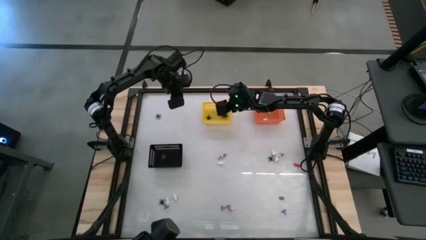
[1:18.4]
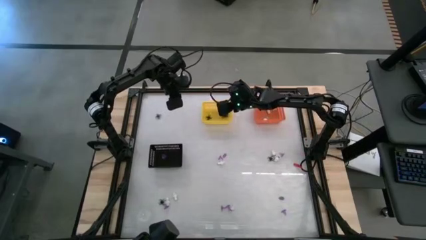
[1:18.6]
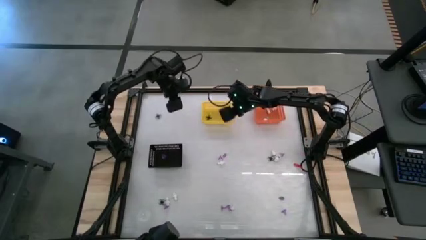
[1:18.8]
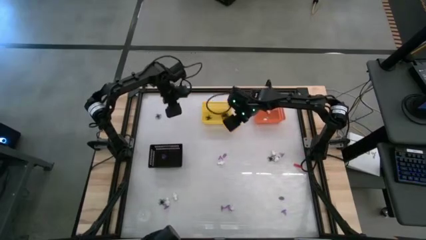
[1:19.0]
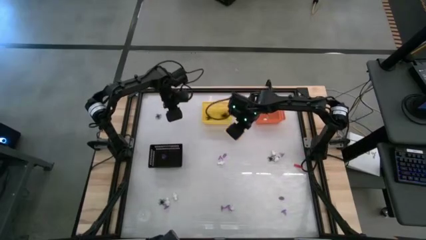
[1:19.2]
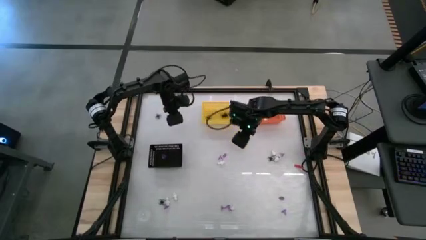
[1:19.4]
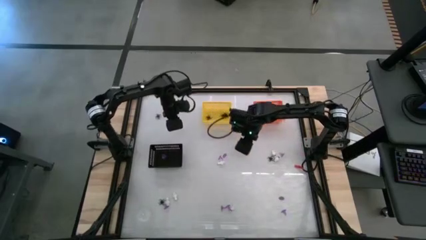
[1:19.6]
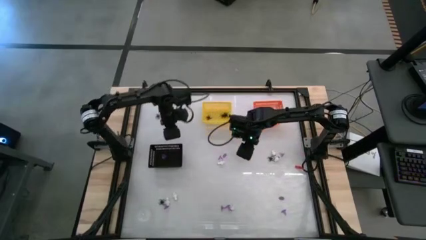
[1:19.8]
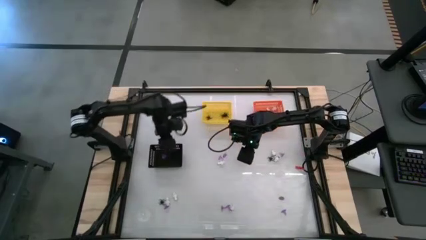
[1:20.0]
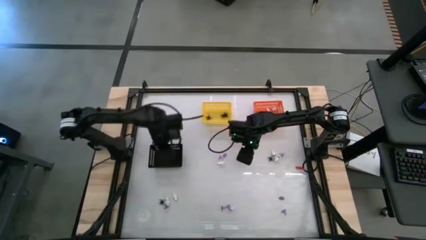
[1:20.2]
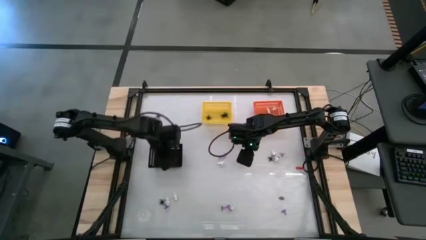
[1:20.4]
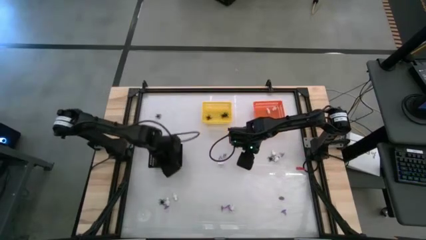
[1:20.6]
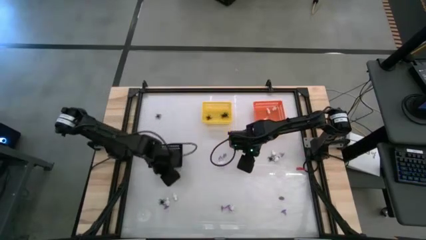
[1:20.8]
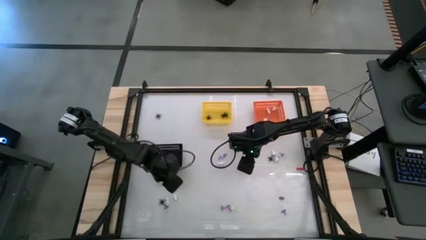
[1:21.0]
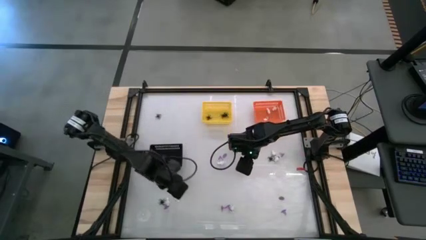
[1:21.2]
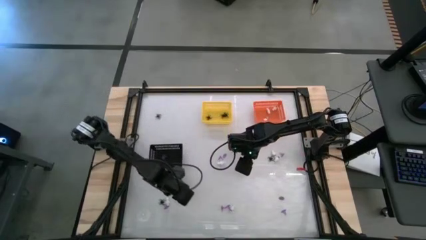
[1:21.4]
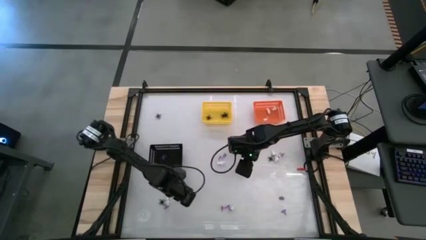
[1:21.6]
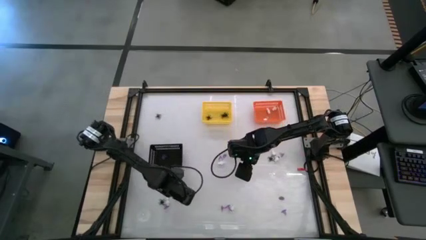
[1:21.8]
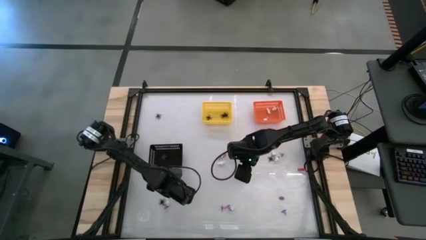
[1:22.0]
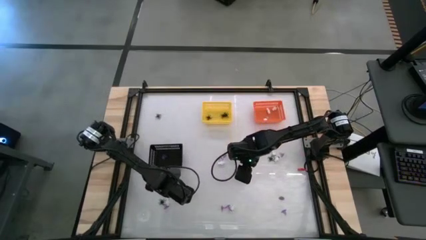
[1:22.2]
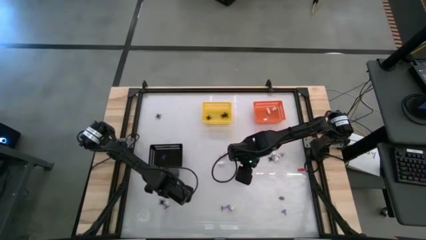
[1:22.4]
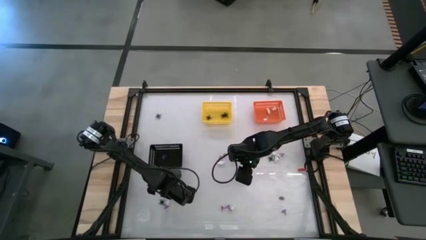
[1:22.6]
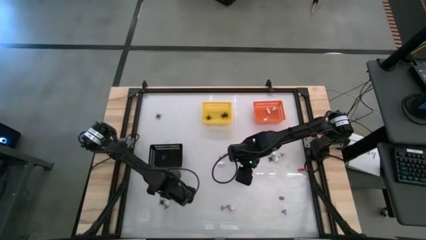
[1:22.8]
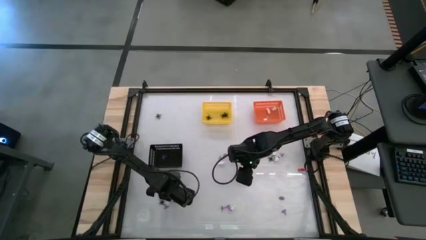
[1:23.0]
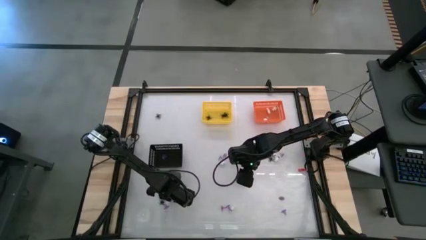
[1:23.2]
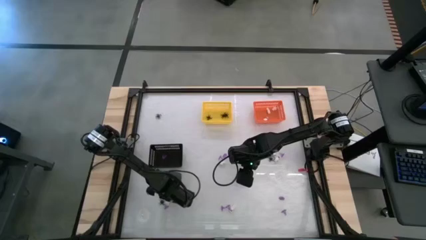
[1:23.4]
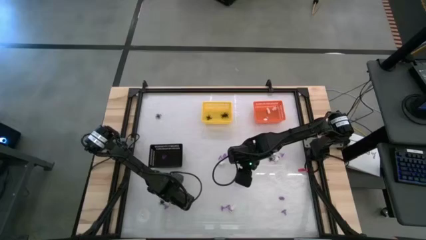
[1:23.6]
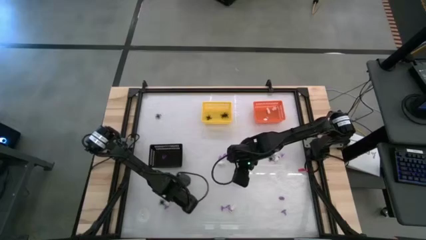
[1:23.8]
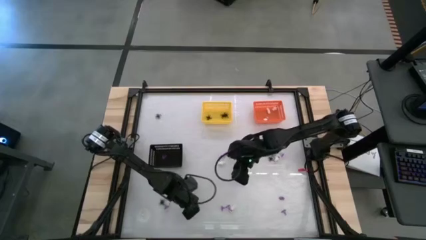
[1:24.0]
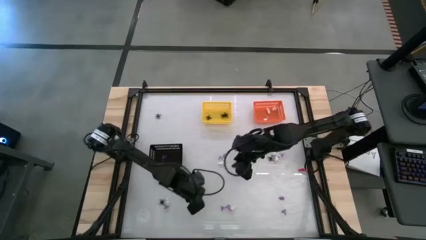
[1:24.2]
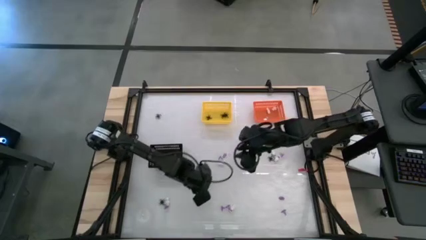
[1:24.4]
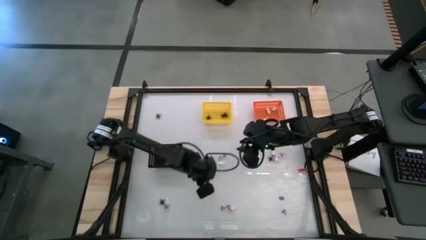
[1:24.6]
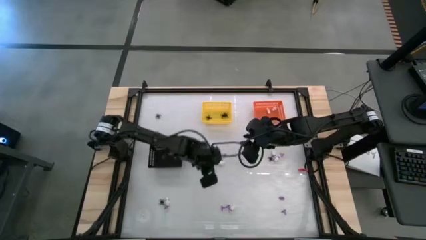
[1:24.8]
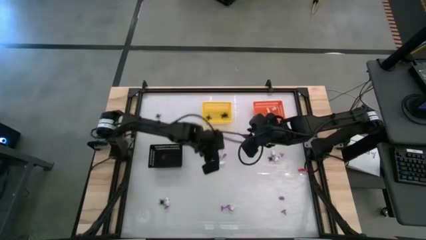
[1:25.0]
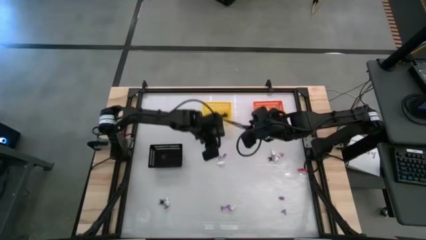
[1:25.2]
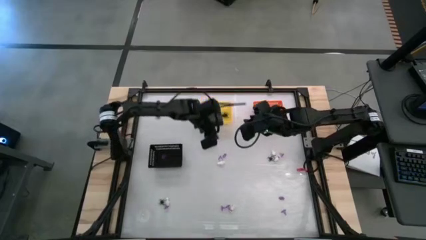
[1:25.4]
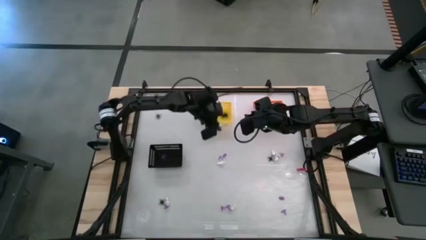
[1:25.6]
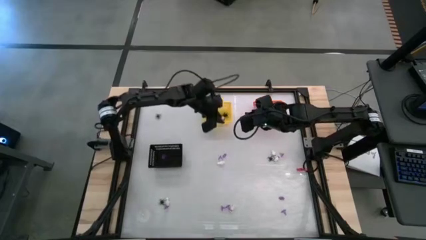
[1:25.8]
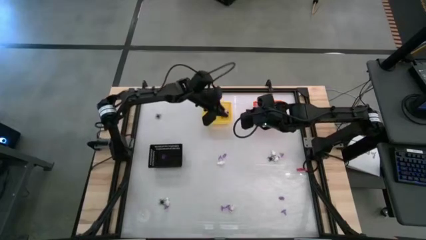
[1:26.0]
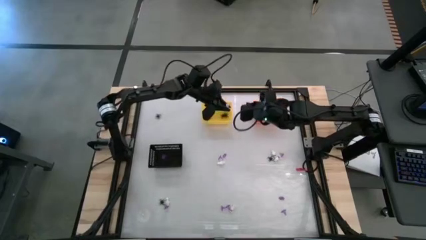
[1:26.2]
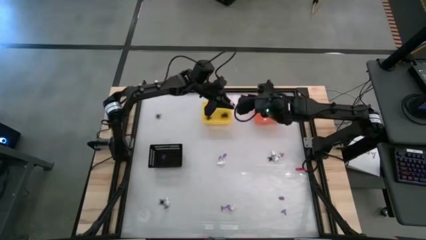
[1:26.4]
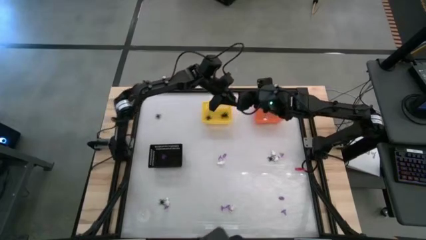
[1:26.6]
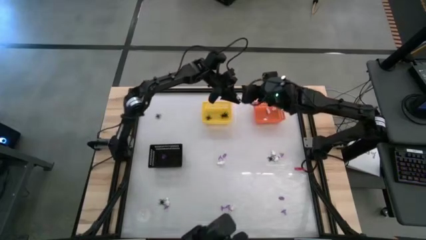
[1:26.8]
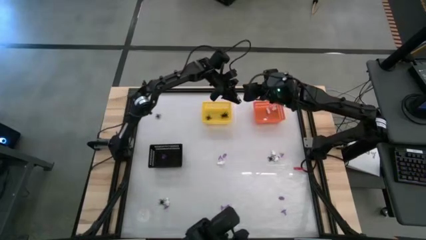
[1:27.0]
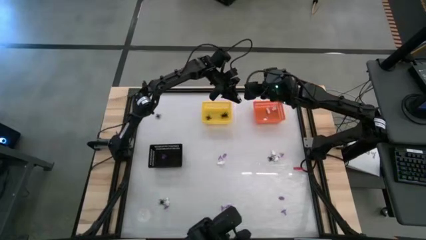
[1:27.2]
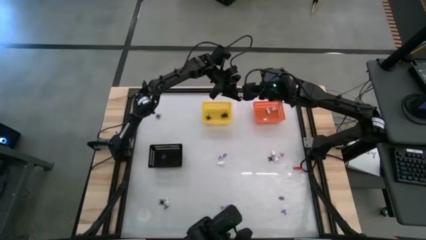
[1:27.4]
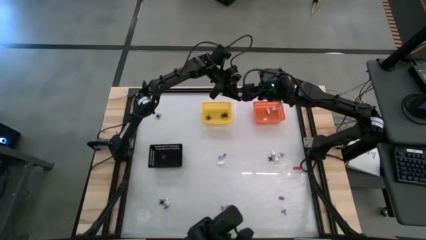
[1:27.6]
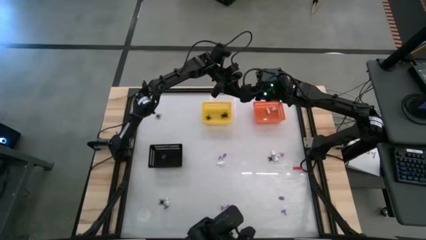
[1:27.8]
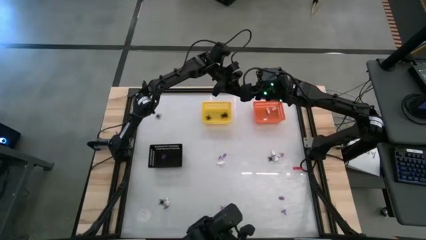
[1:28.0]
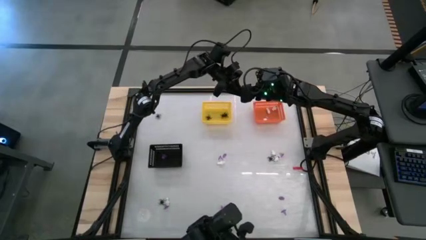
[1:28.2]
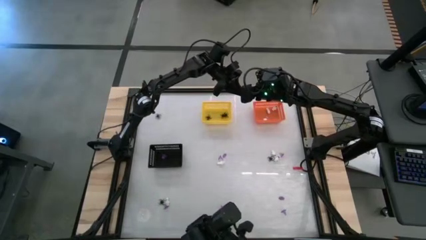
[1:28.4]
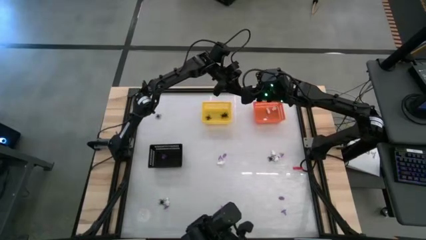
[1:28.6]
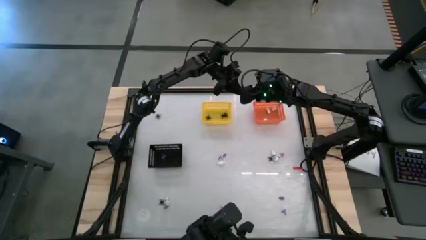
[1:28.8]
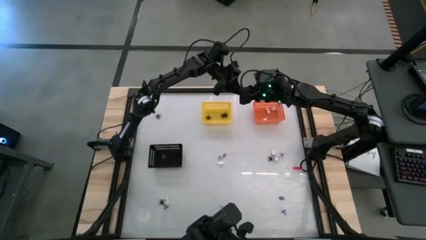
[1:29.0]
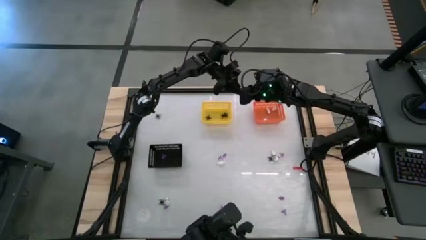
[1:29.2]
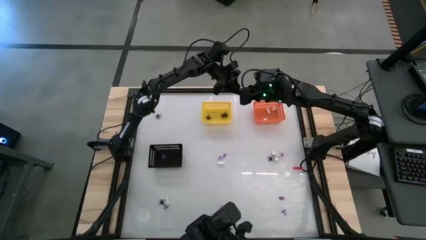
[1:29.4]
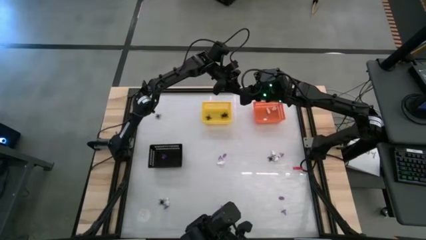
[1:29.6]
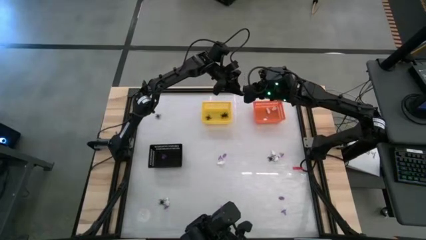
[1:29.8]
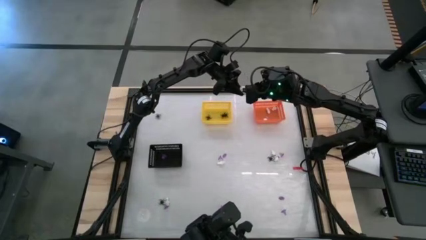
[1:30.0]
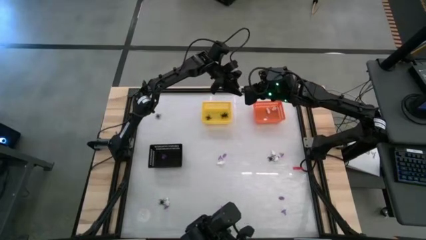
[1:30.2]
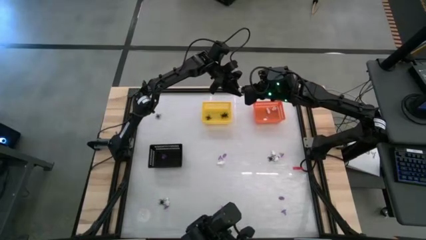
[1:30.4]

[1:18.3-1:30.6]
Task: Sort Halloween decoration
Put the white skeleton toy into the orange basket

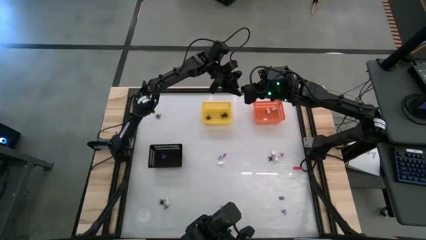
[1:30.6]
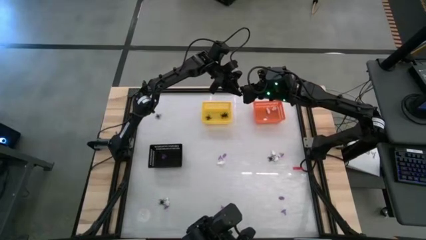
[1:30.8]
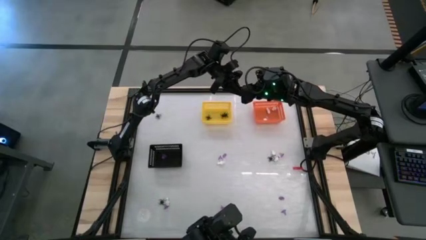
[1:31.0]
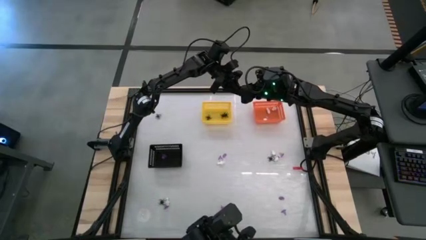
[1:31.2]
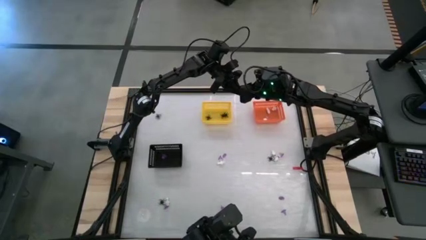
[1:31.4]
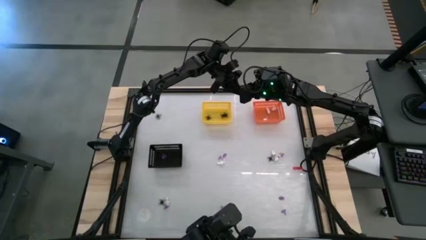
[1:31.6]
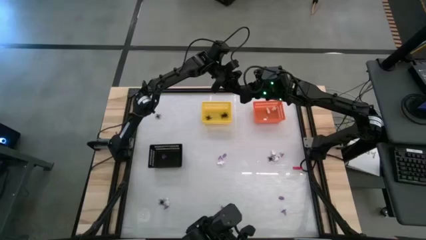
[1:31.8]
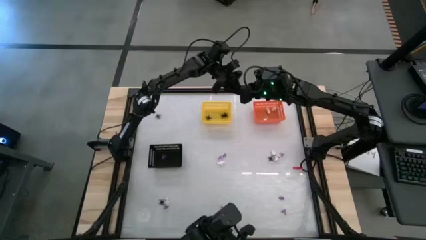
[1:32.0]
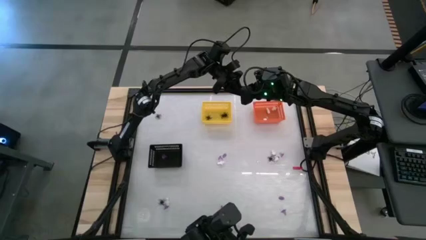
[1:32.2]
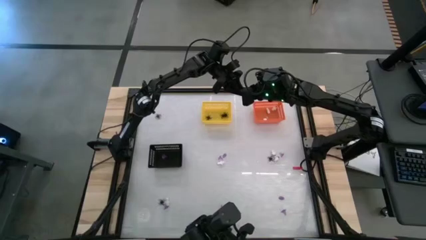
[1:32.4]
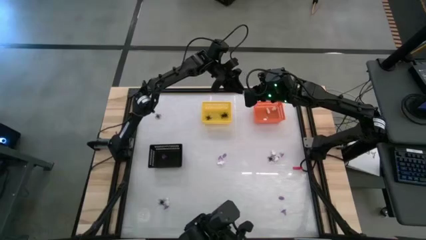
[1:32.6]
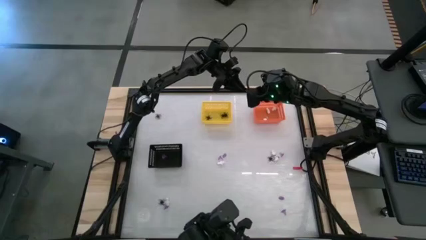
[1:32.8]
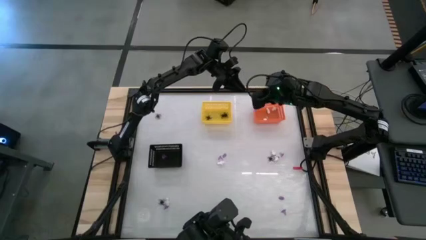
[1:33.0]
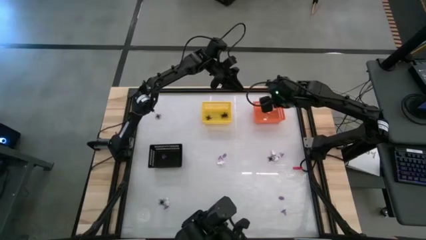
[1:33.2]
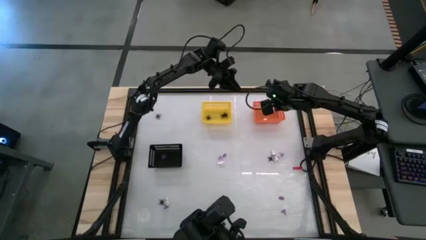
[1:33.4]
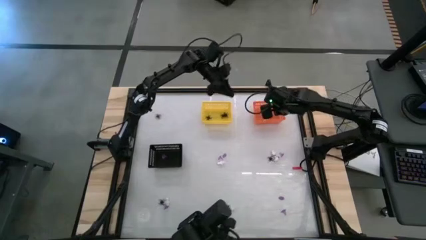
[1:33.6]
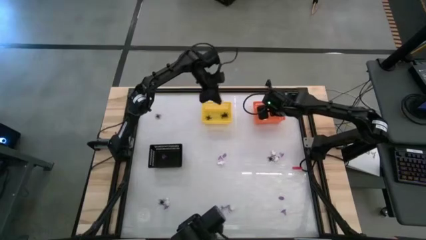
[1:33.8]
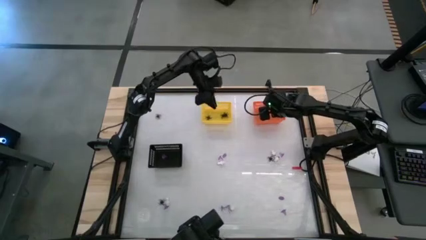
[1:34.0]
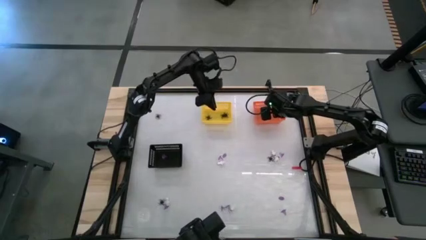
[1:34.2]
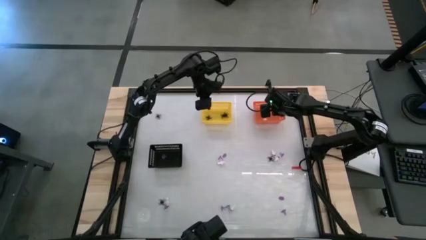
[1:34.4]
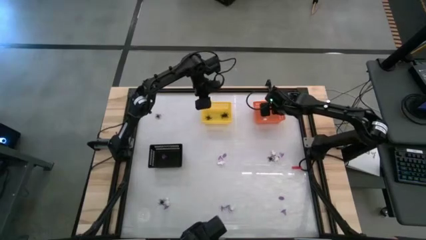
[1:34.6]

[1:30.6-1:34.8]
Put the white skeleton toy into the orange basket
